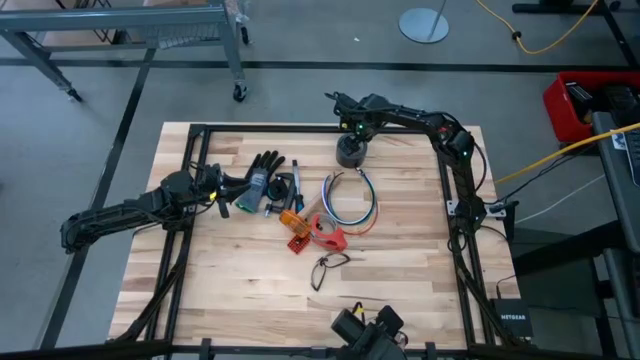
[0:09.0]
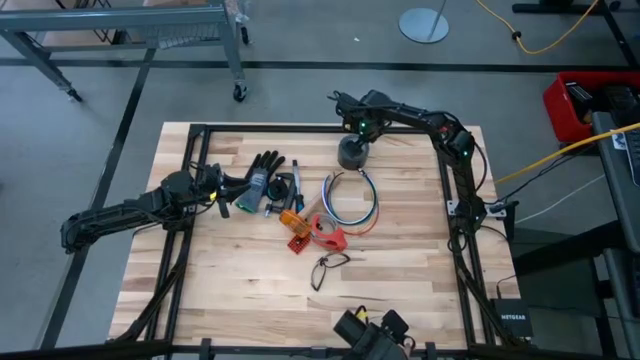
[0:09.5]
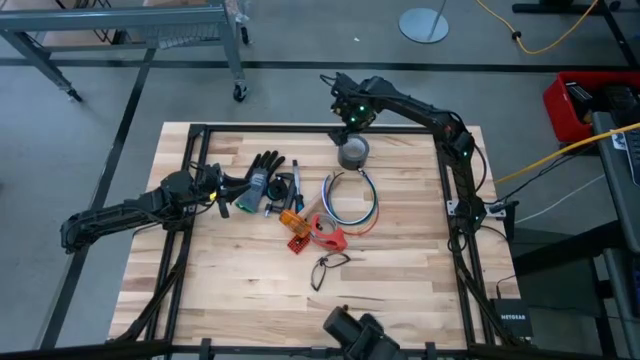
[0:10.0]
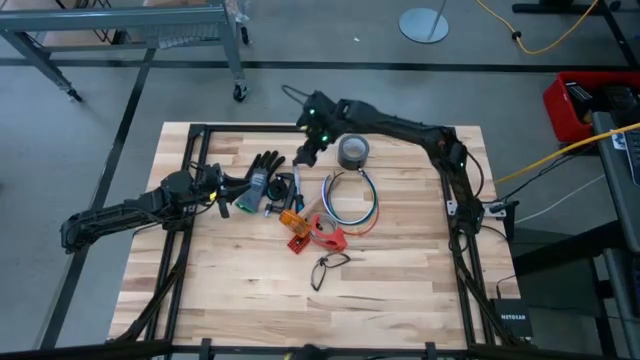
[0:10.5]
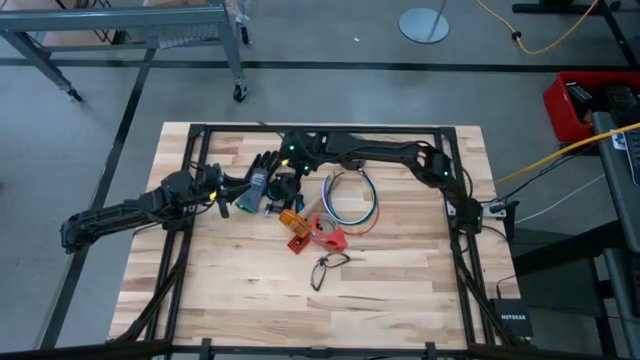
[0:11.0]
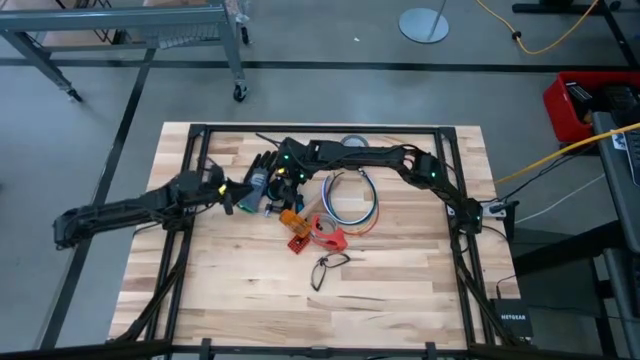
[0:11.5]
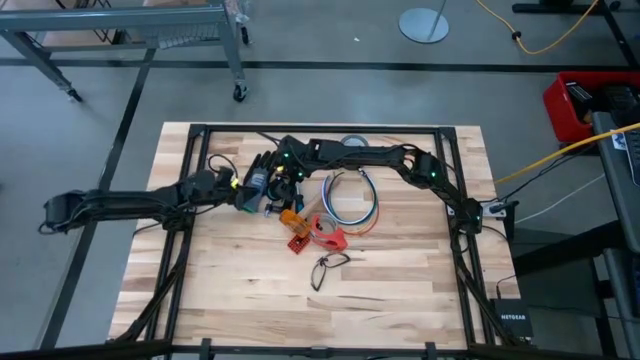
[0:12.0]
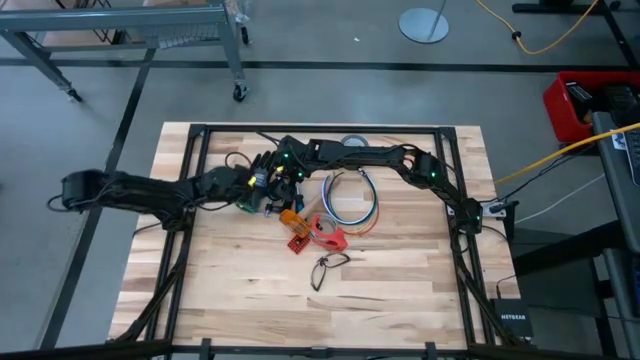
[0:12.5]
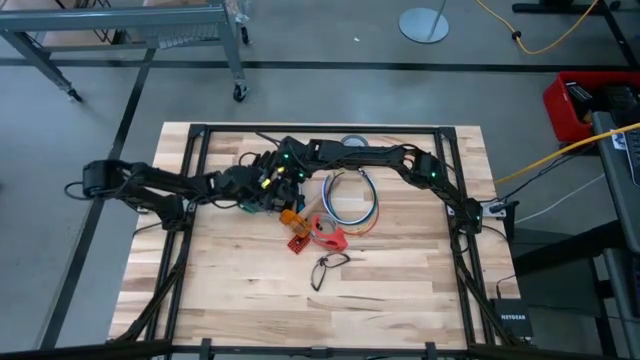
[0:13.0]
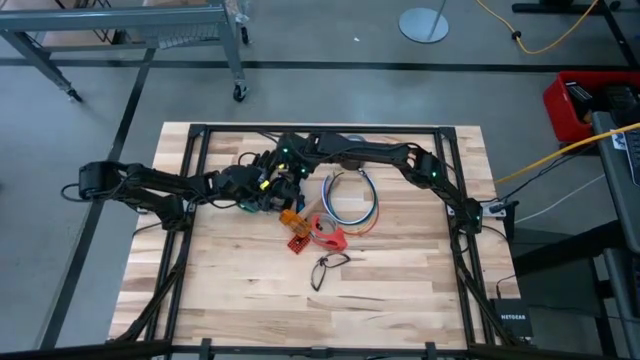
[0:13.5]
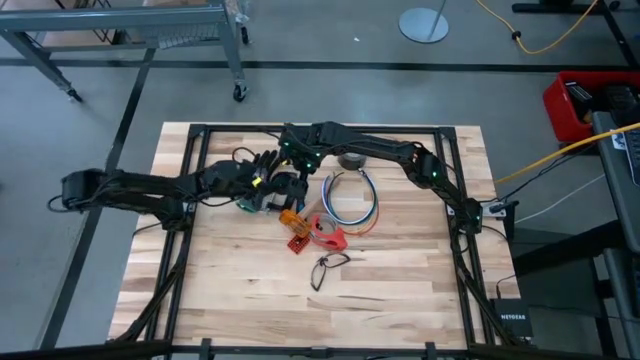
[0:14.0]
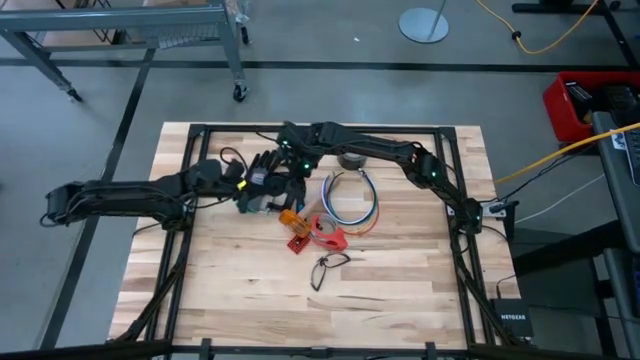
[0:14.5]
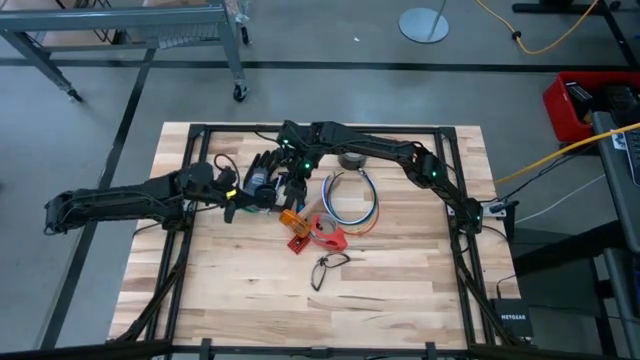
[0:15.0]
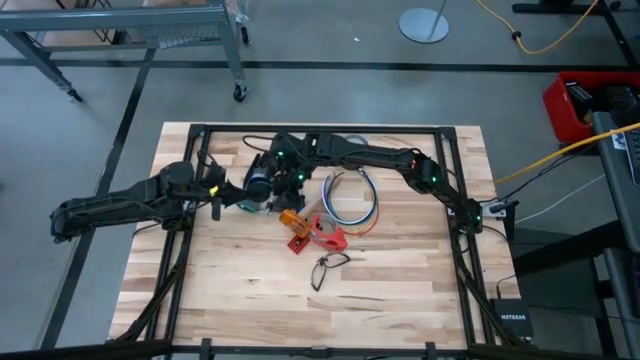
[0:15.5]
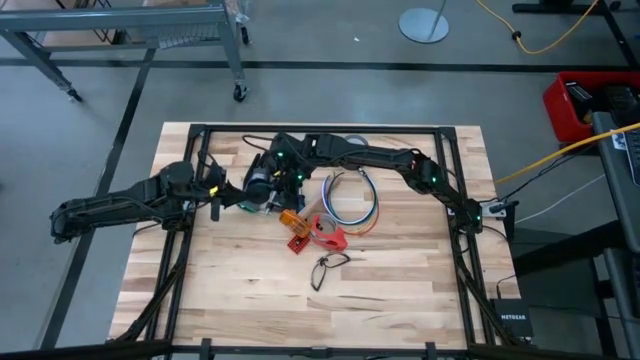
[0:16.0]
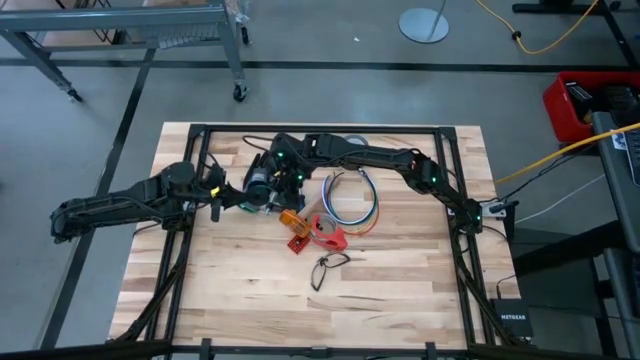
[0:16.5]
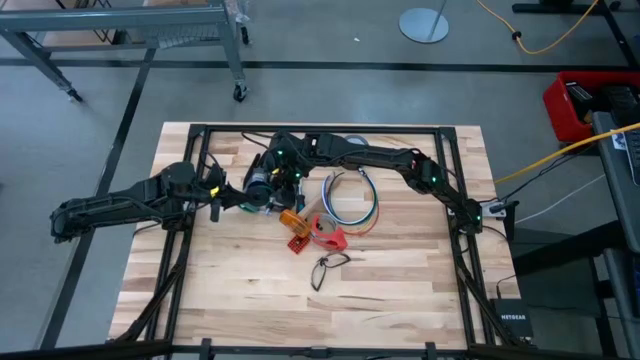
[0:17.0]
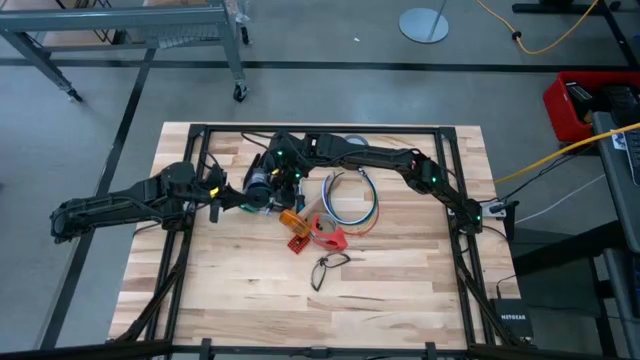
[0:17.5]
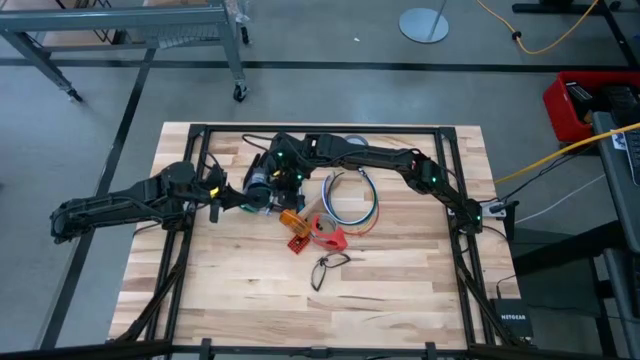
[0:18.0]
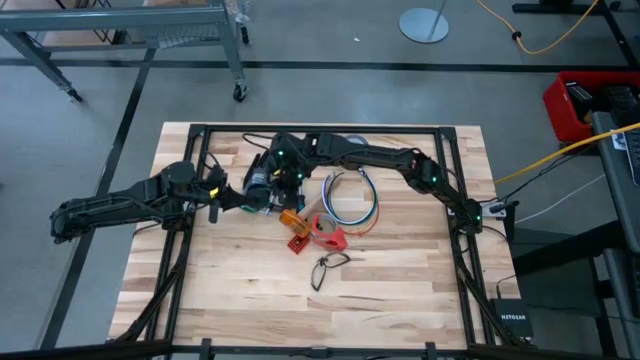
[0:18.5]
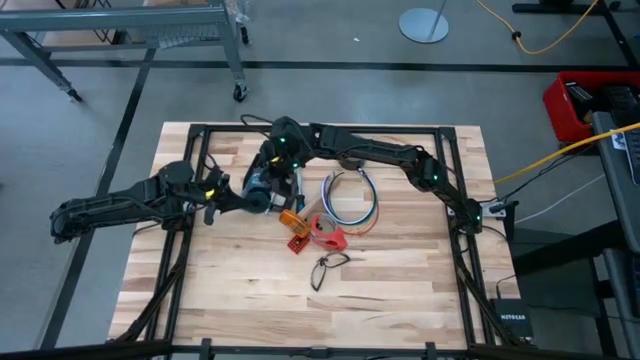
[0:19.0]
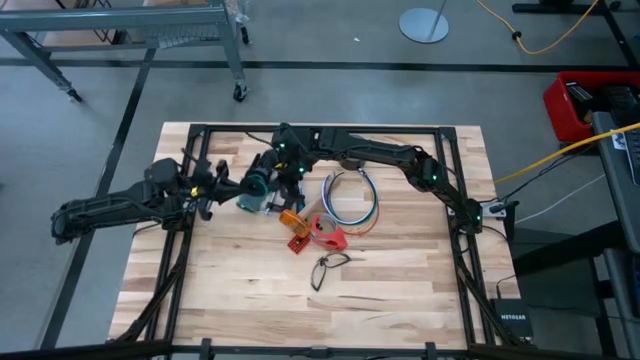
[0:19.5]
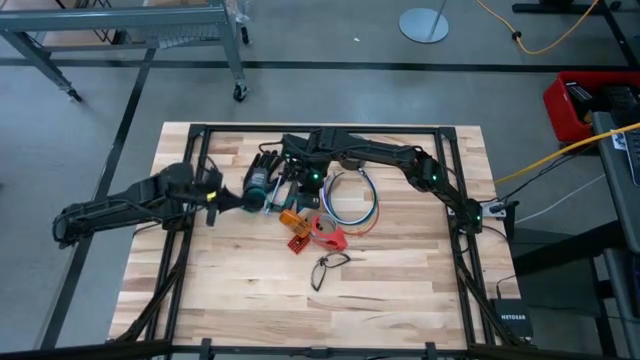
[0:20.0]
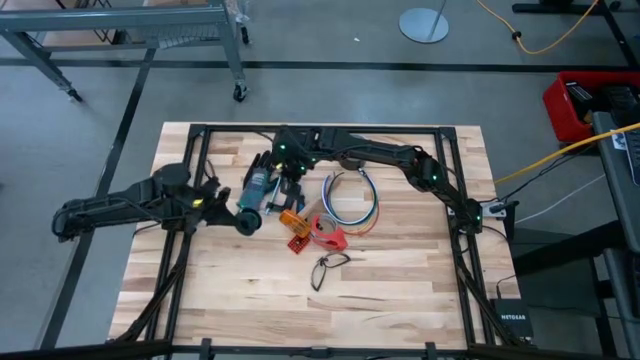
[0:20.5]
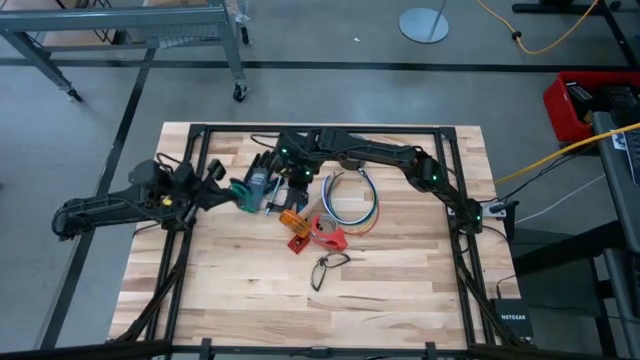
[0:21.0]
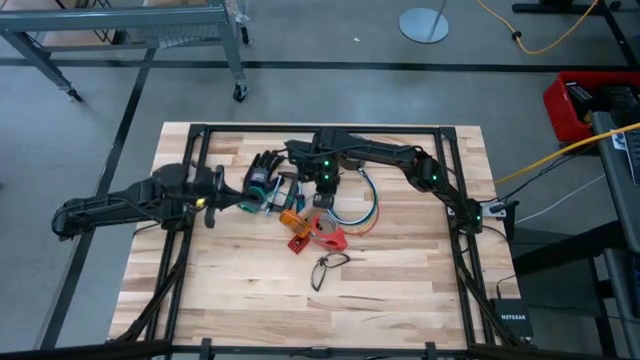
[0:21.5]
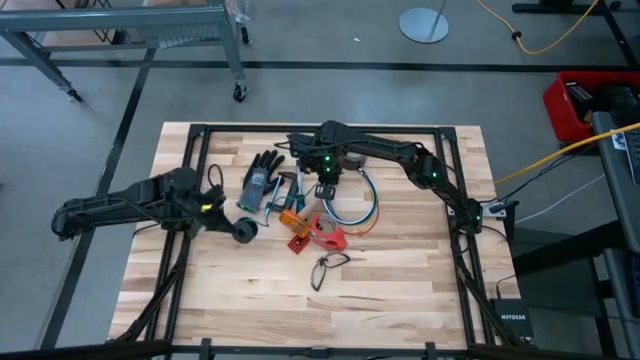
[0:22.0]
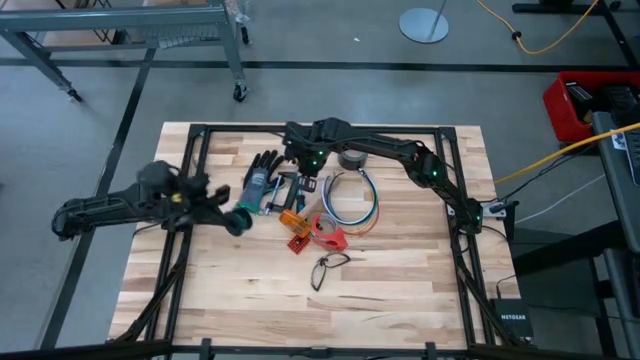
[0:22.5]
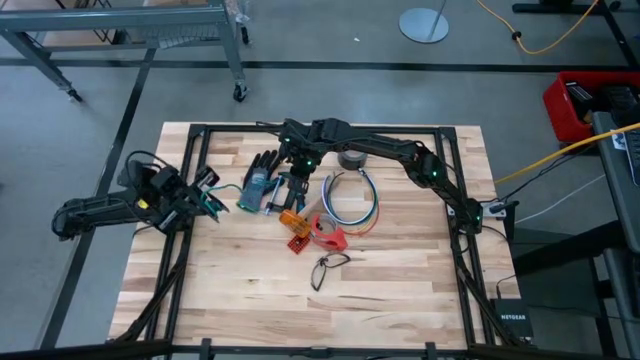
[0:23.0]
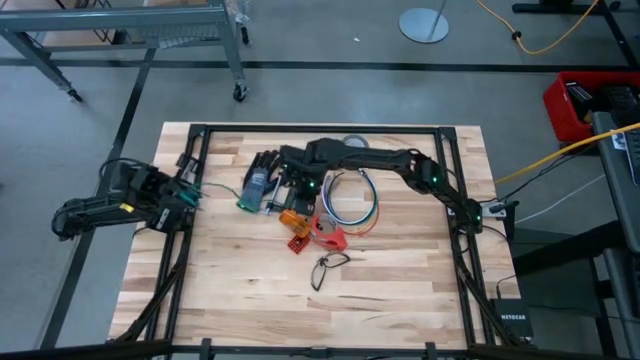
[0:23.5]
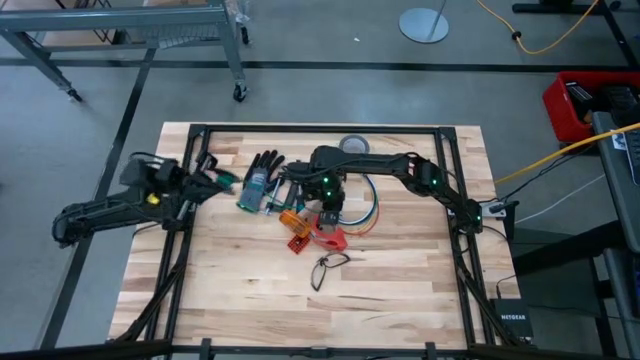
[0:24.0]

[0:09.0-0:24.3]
Task: Coil cords
Uncoil the green wire from the spool
